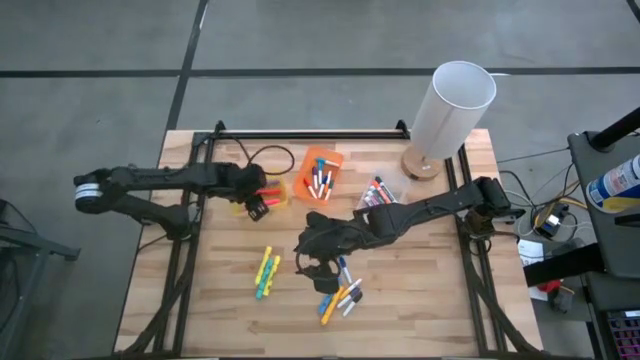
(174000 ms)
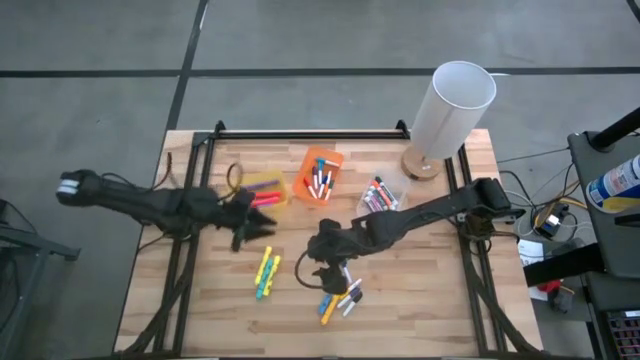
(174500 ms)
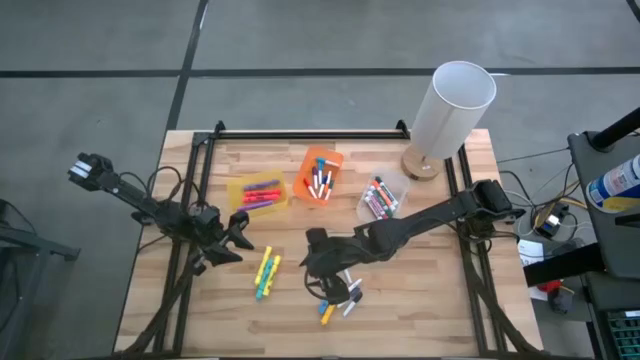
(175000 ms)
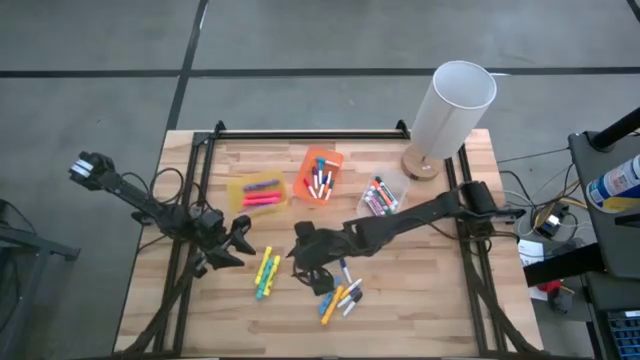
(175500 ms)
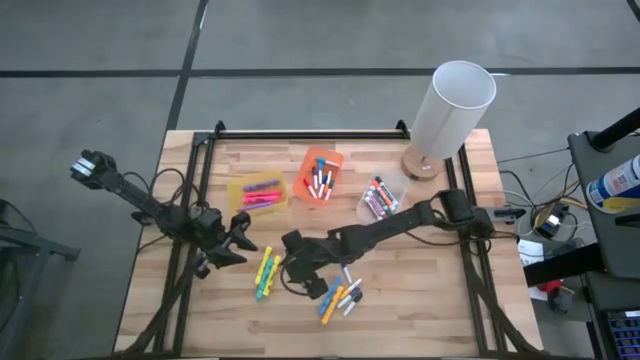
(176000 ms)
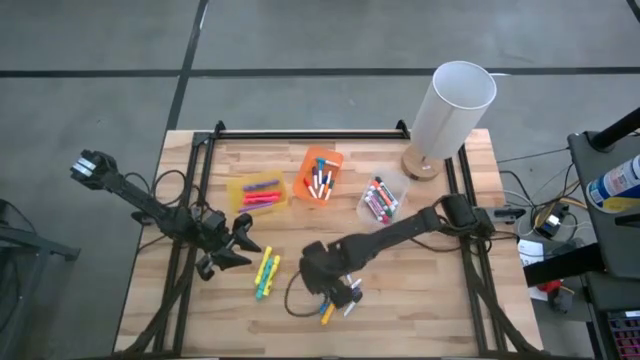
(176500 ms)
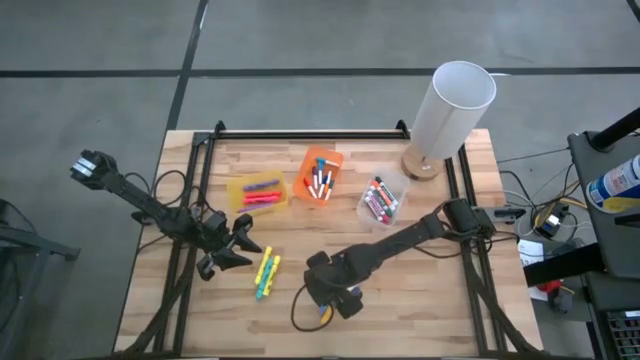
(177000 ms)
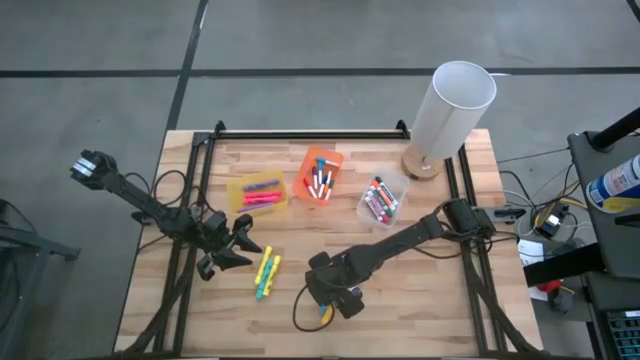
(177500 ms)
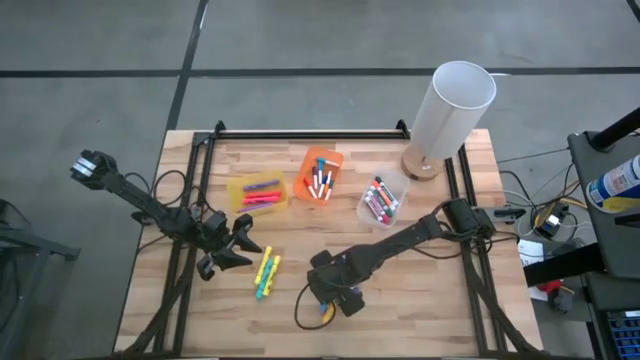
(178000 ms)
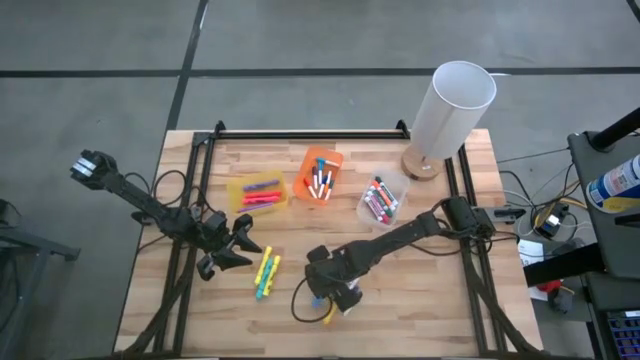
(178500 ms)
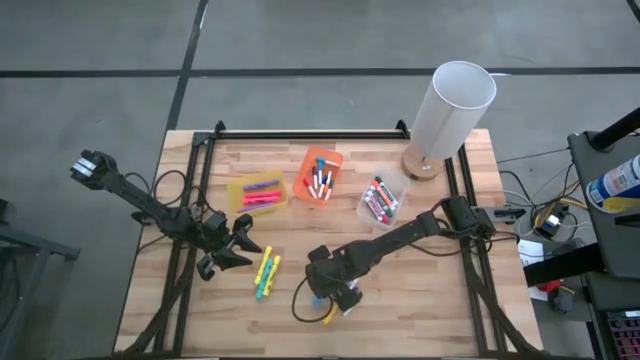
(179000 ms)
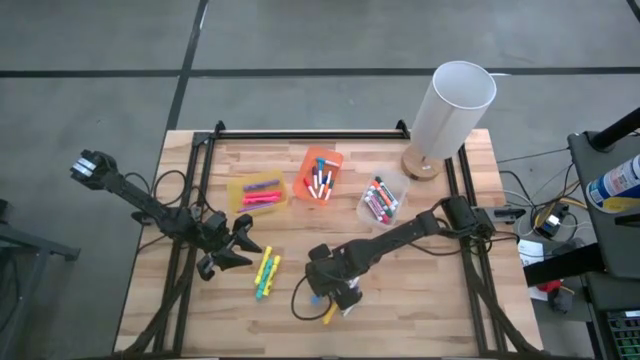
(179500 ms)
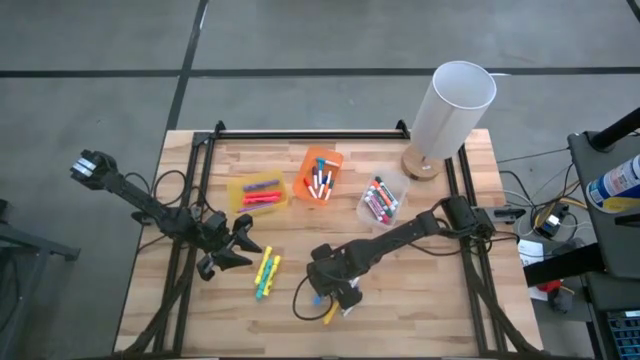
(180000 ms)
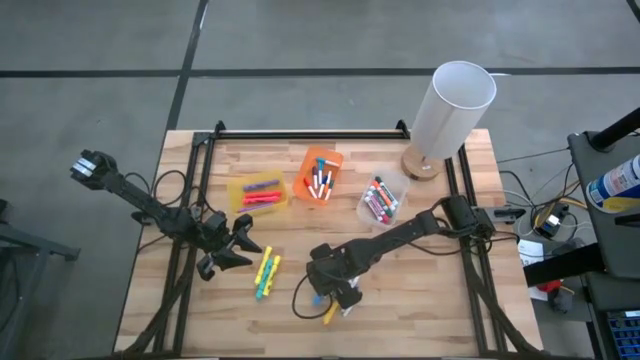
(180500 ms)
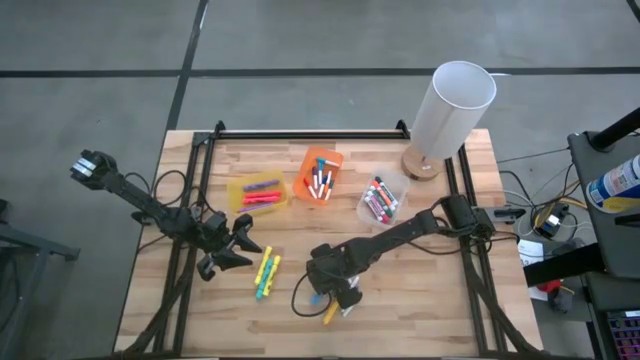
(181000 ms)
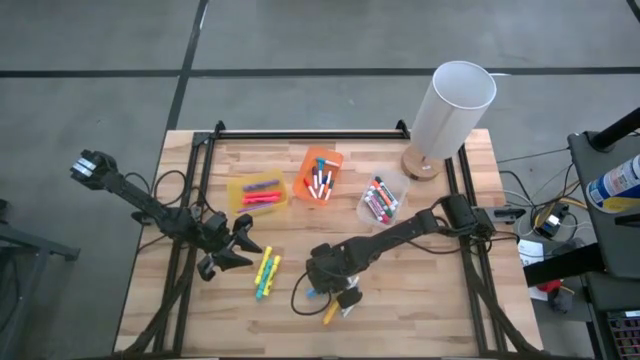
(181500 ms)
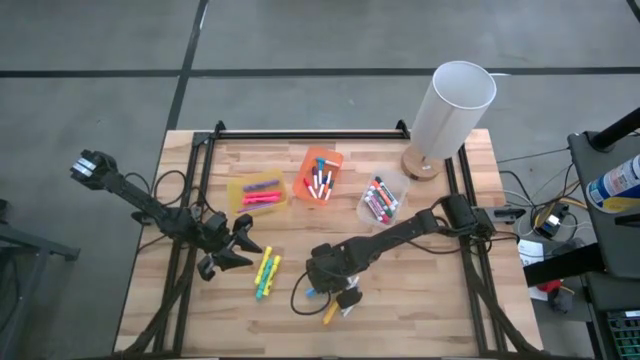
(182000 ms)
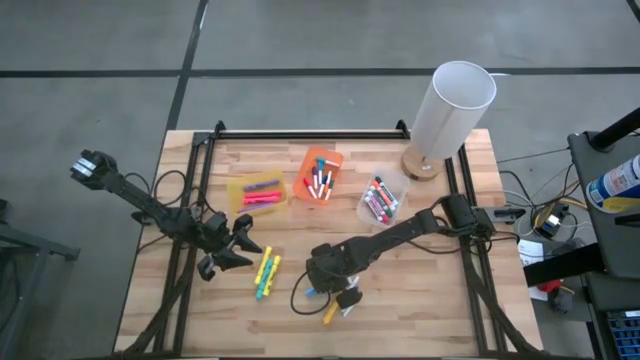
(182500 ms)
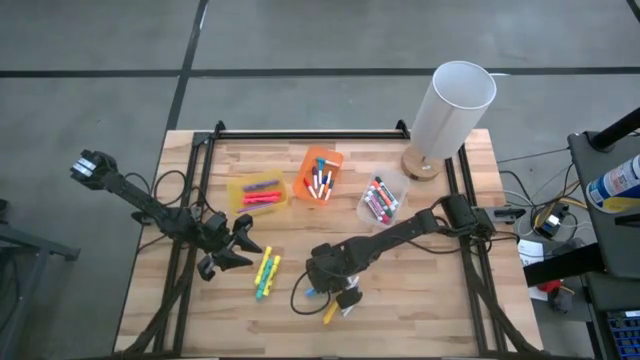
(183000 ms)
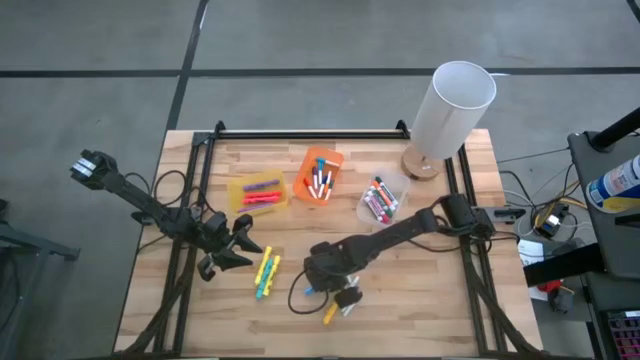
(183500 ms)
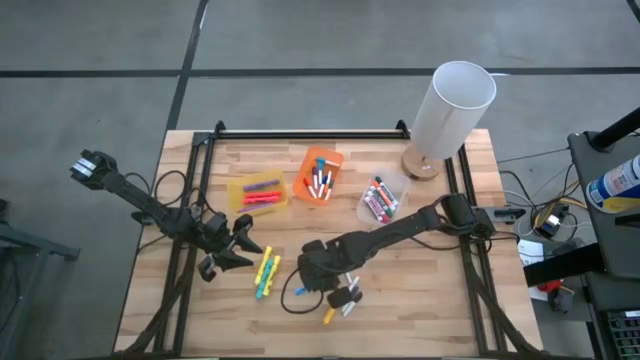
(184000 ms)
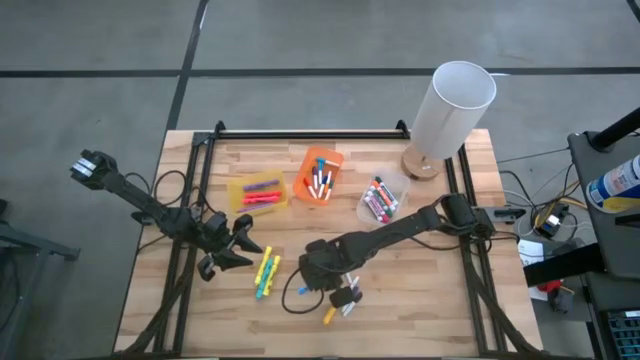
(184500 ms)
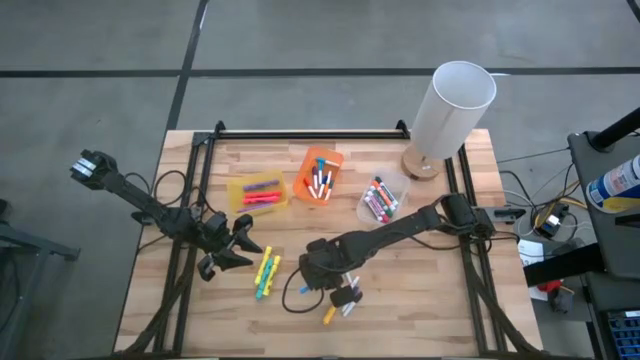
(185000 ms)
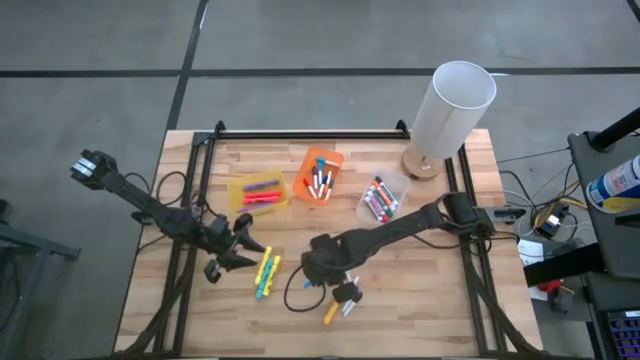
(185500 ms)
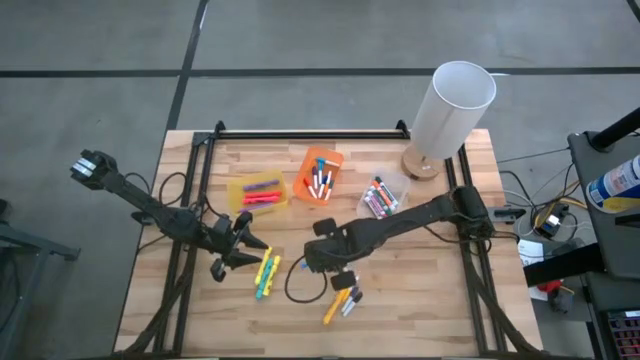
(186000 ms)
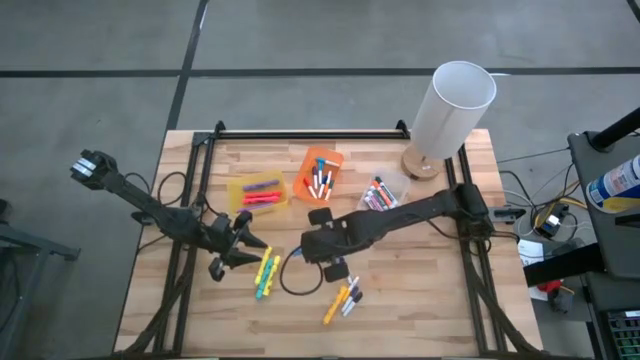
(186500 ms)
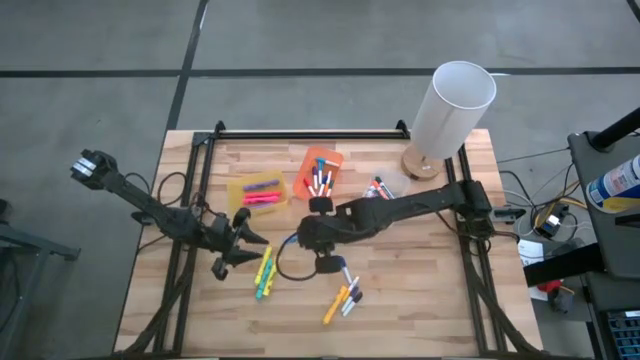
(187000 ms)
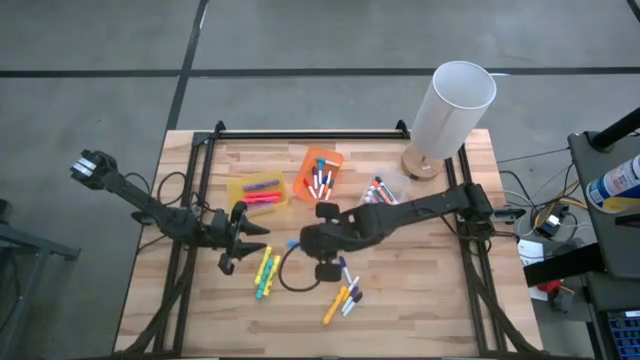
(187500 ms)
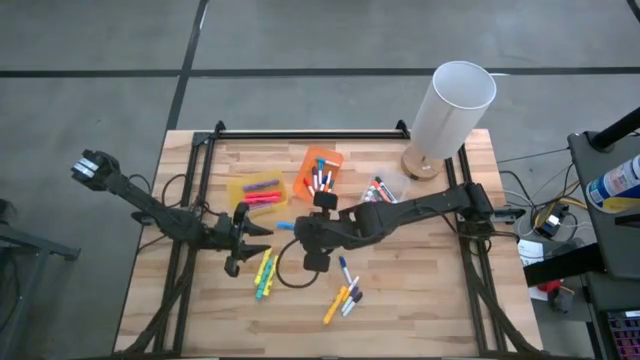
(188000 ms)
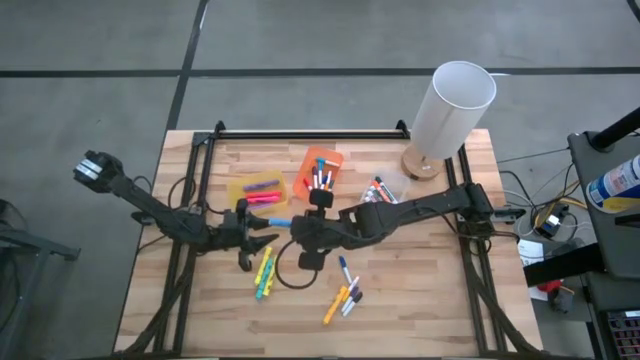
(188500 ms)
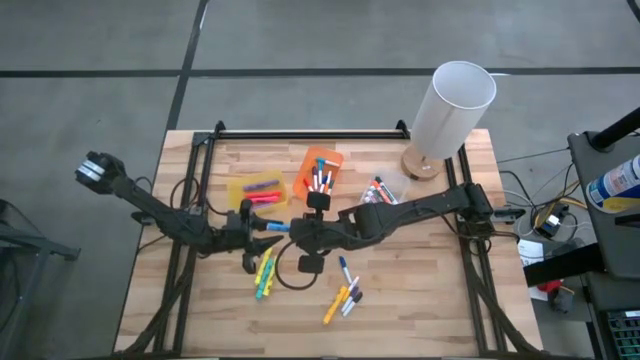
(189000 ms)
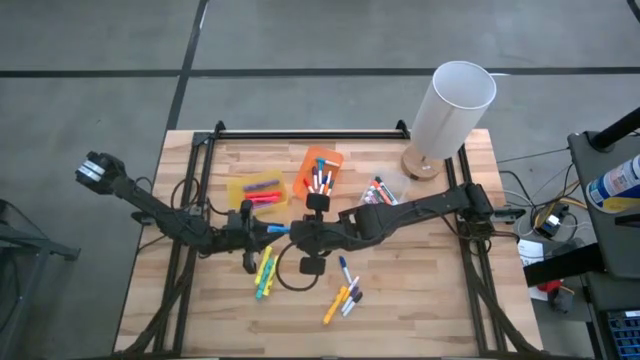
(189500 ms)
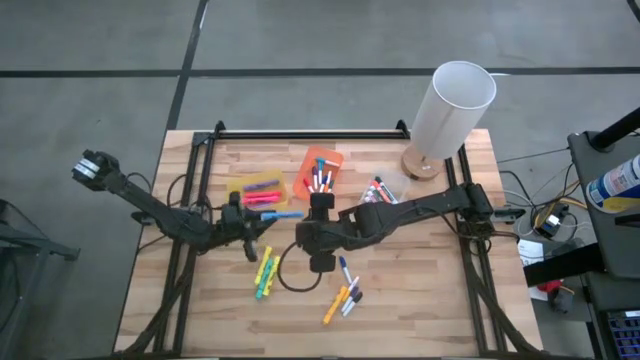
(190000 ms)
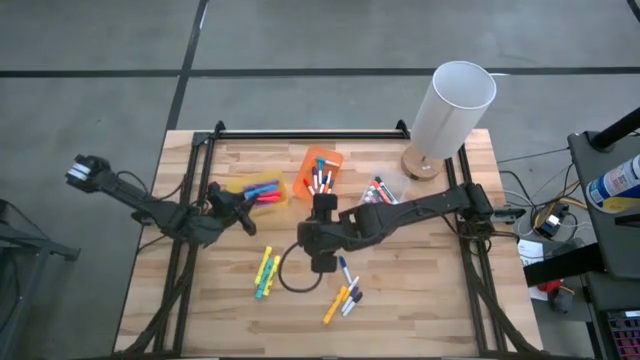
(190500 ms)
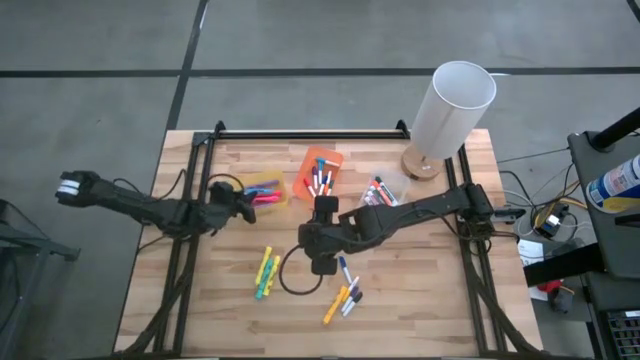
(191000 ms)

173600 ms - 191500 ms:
Task: Pick & Place Markers
Put the blue highlighter pen into the yellow bin

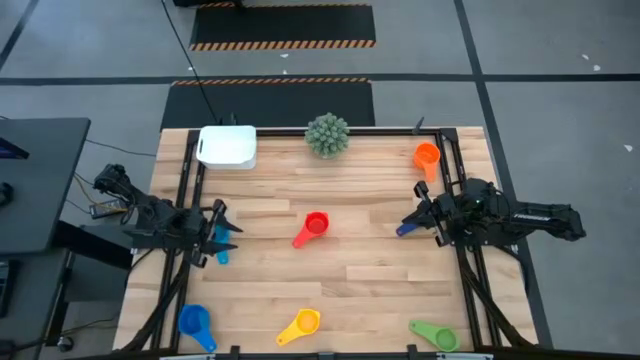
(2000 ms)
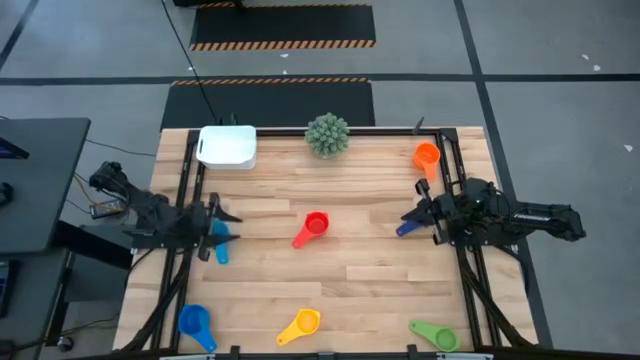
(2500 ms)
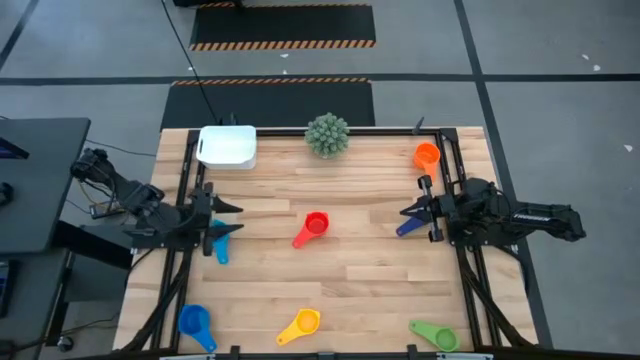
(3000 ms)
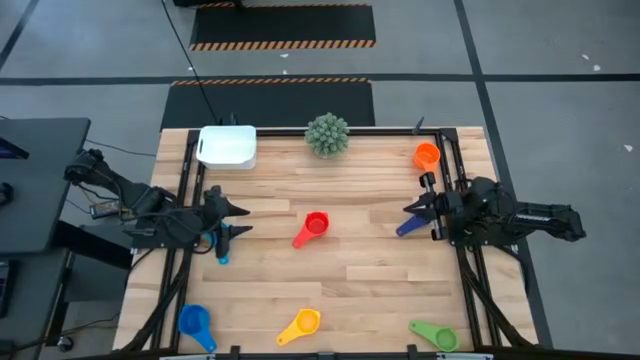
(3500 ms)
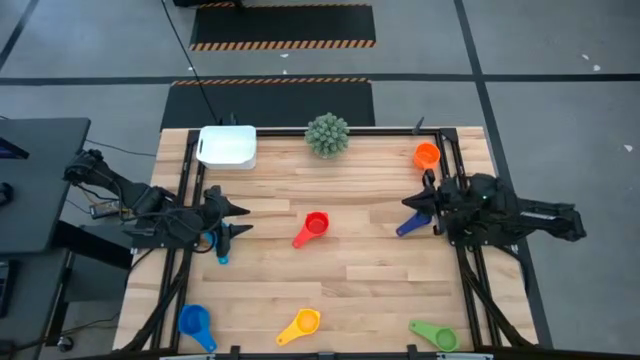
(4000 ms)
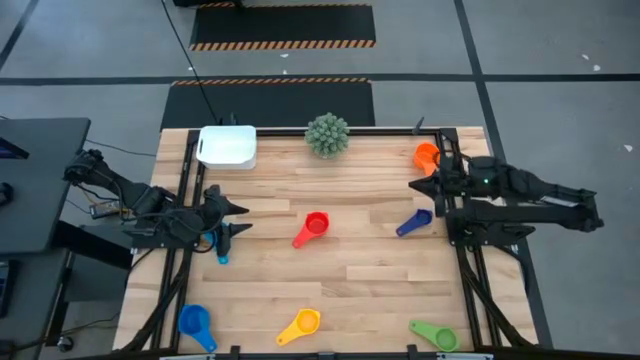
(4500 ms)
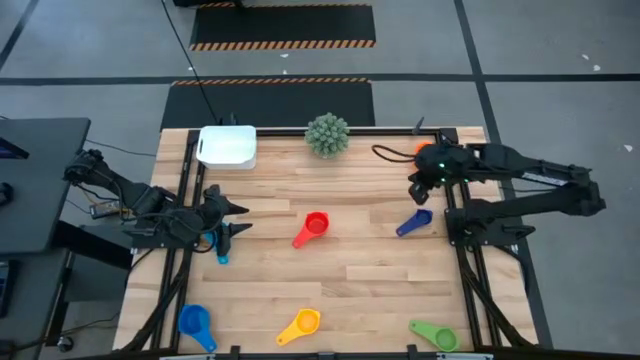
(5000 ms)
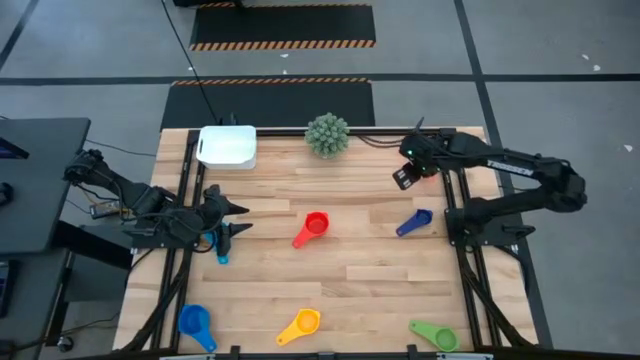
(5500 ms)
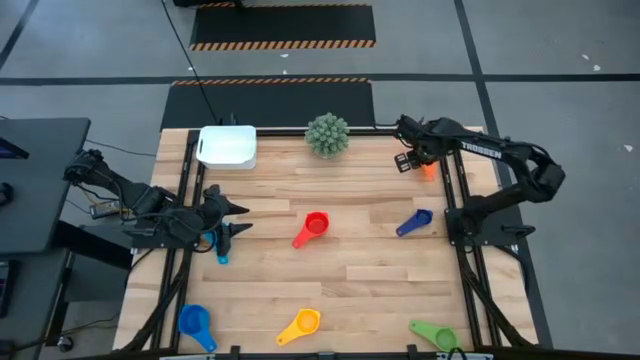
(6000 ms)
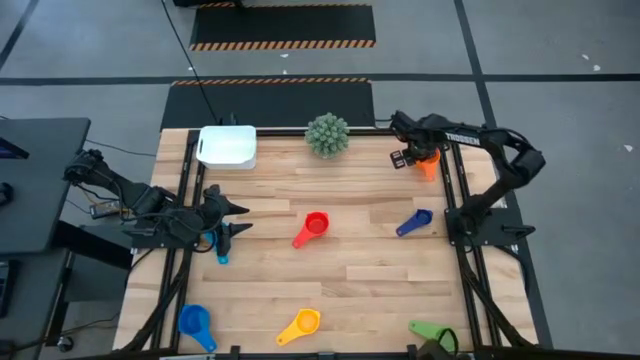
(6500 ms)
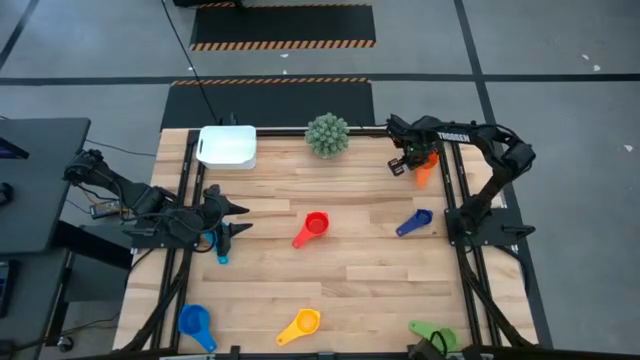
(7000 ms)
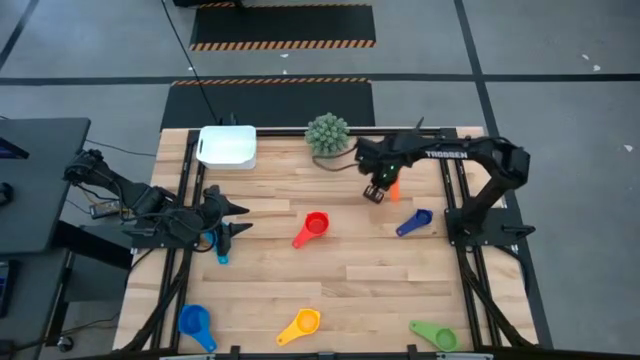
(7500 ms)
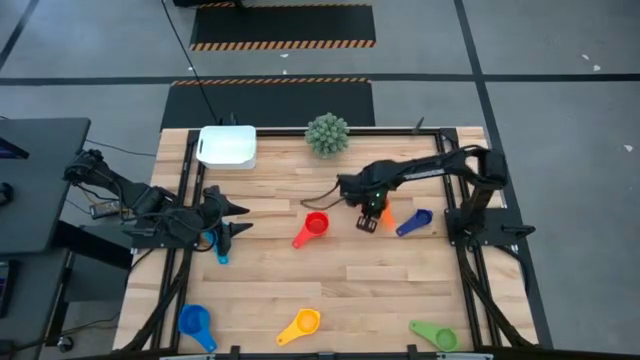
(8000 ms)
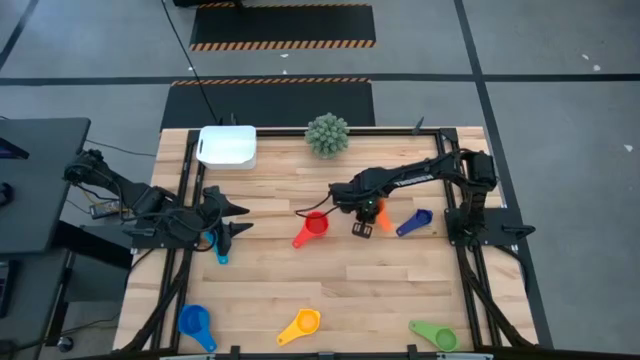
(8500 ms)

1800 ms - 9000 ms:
Task: Nest measuring cups in basket
Move the orange measuring cup between the red measuring cup and the violet measuring cup
